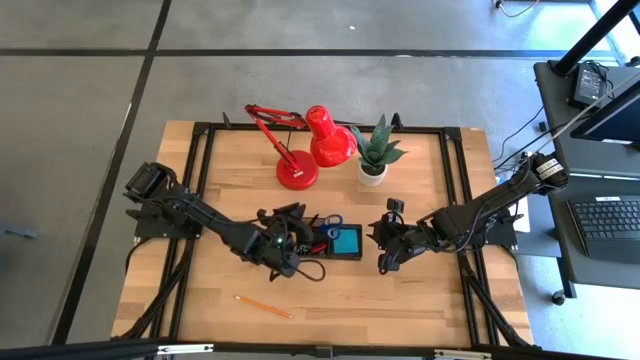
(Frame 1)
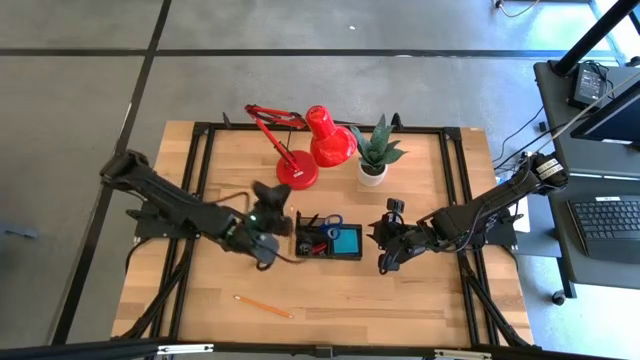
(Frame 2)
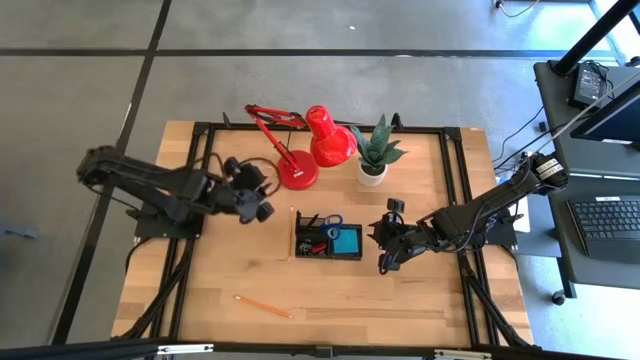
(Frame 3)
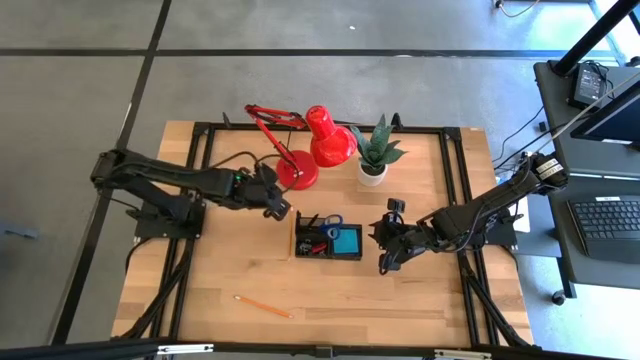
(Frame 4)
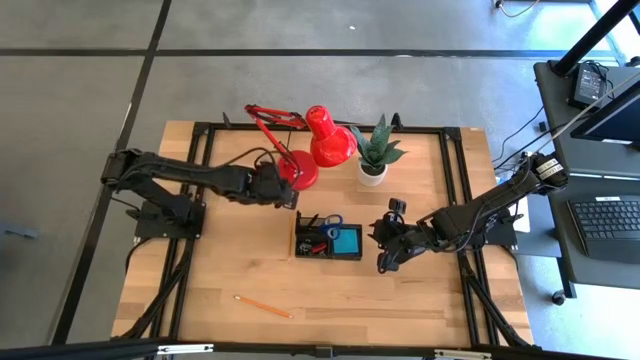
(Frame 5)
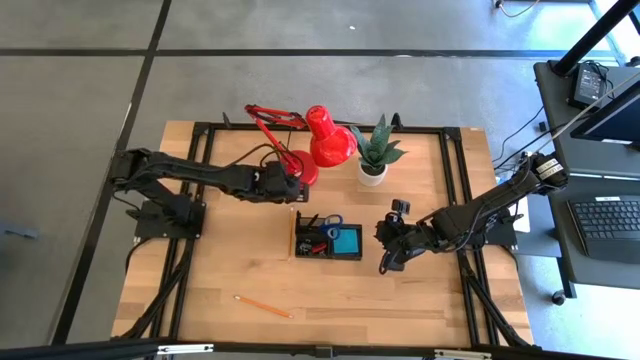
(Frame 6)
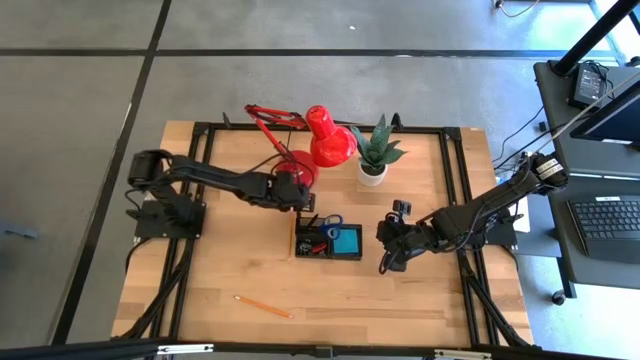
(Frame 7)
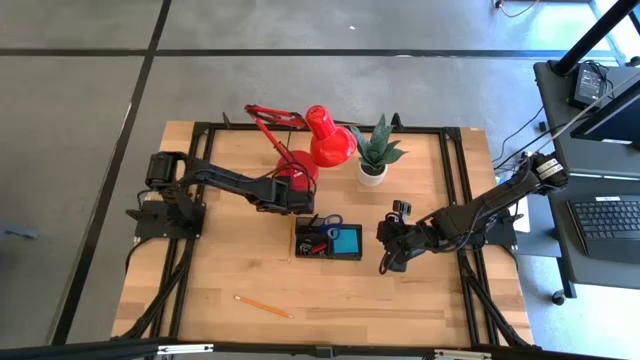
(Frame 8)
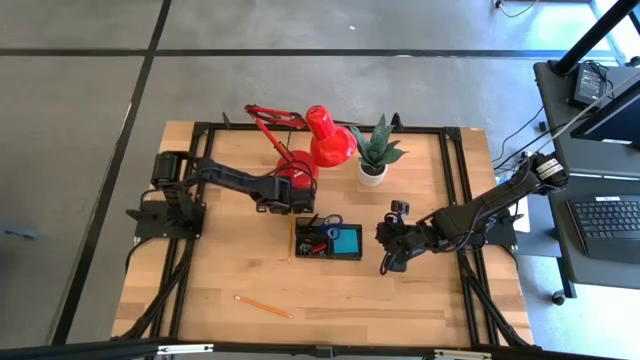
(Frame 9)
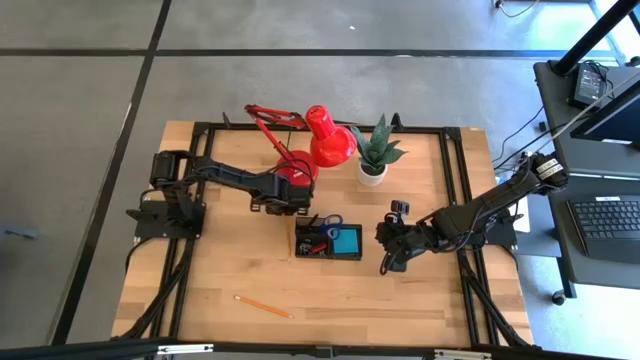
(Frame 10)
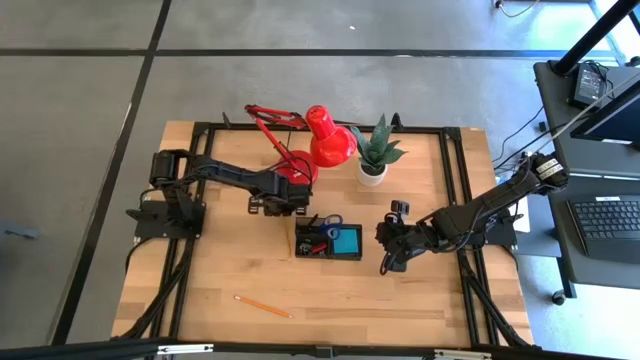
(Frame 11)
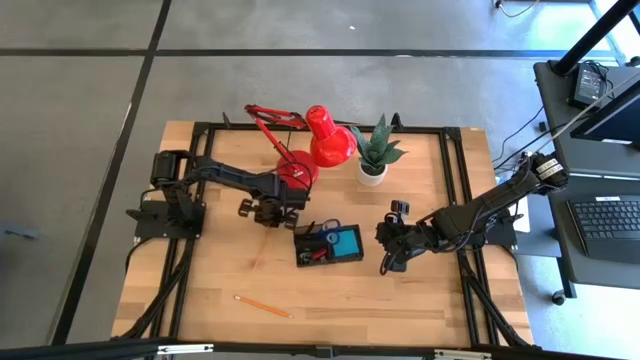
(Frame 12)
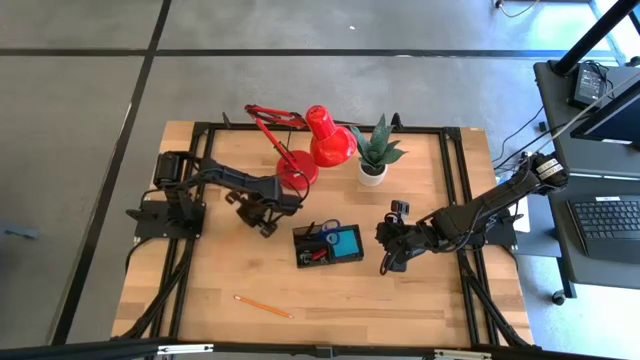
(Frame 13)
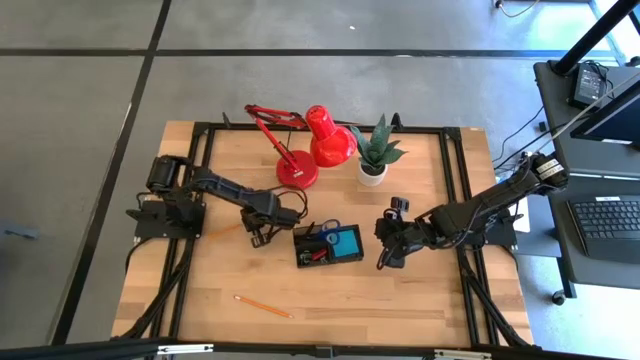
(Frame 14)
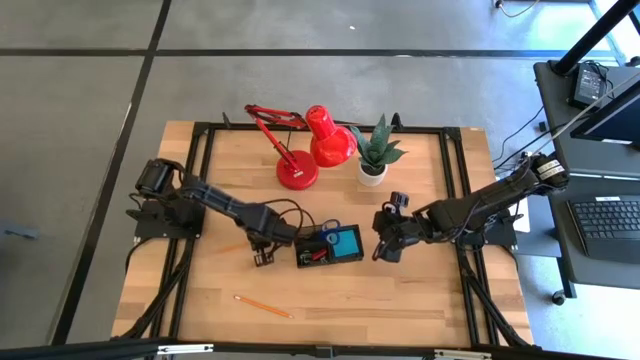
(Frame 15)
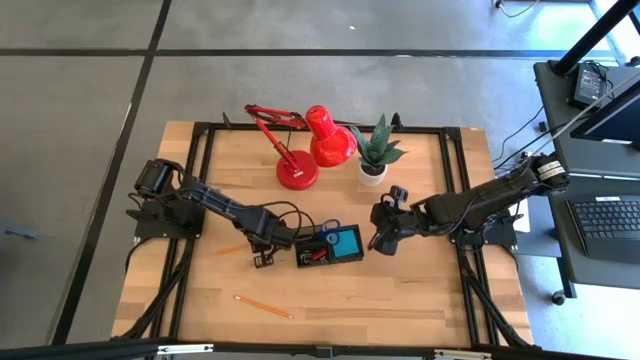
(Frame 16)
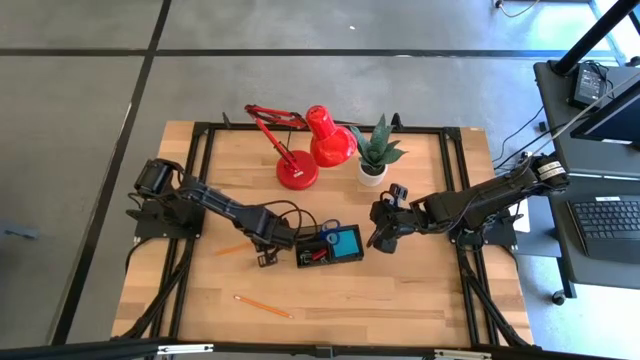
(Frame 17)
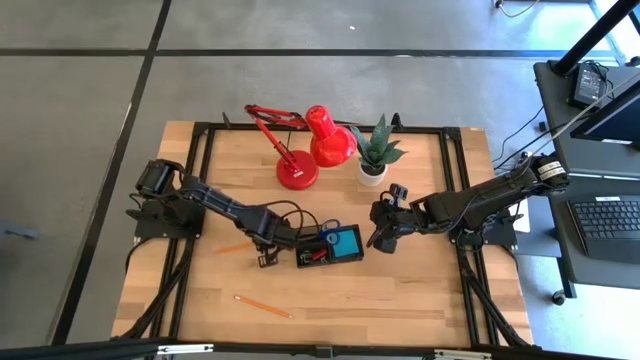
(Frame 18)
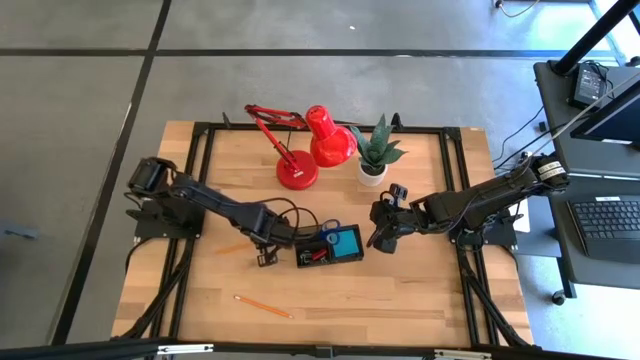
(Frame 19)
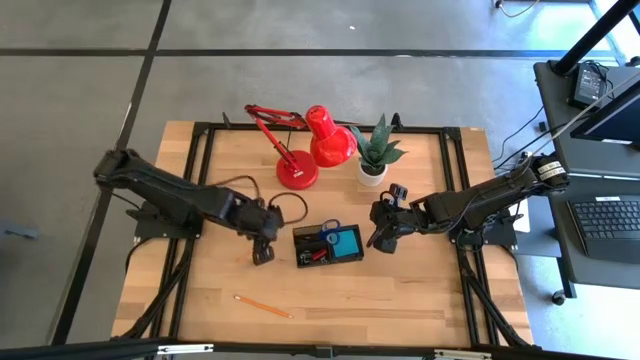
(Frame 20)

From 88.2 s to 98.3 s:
Task: Pick and place office supplies into organizer
Put the top yellow pencil into the black desk organizer

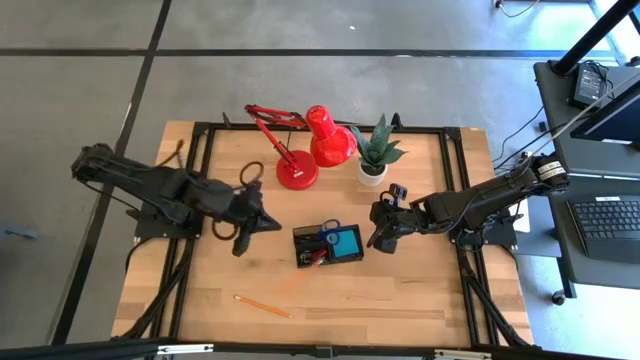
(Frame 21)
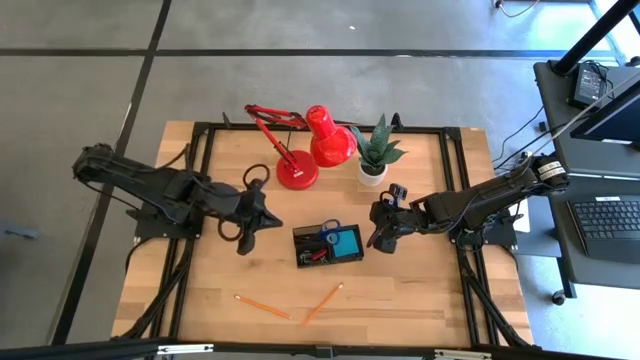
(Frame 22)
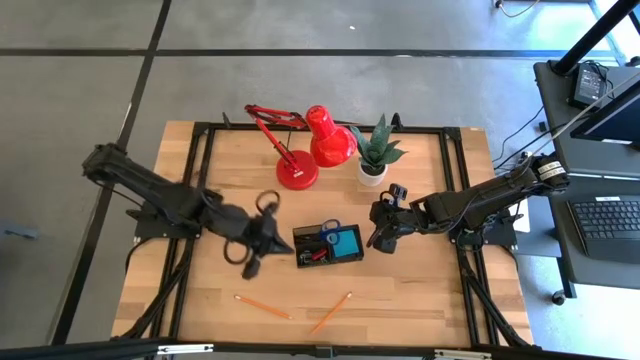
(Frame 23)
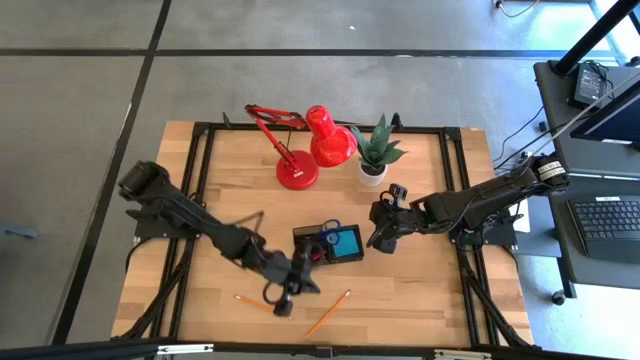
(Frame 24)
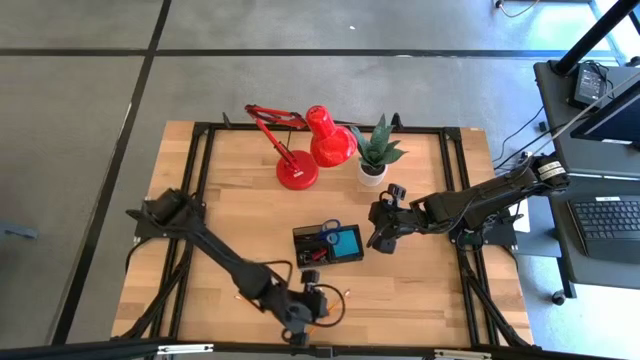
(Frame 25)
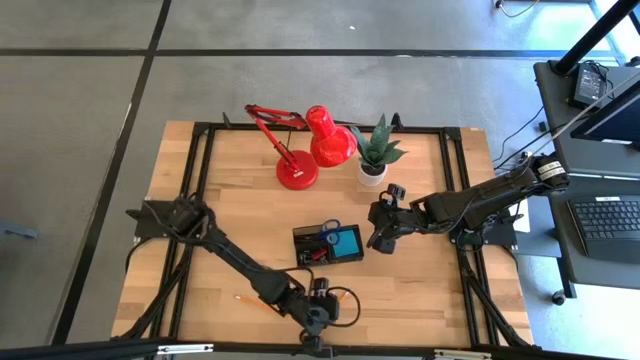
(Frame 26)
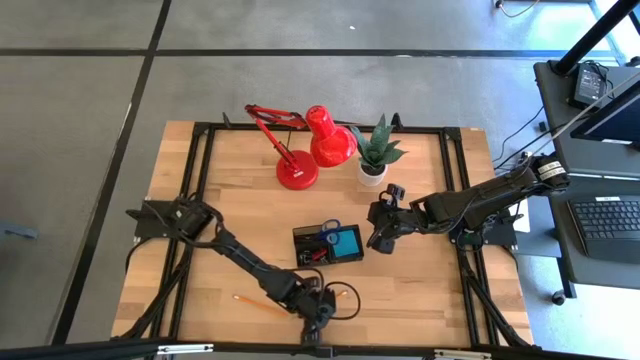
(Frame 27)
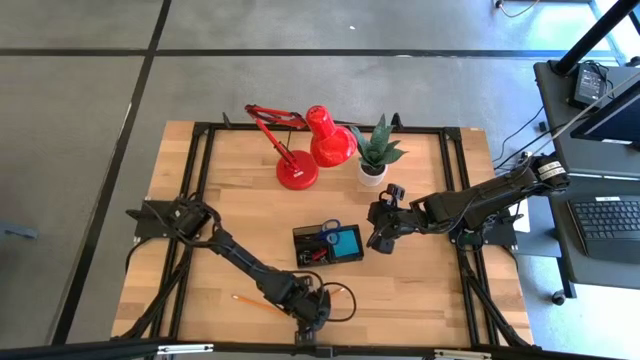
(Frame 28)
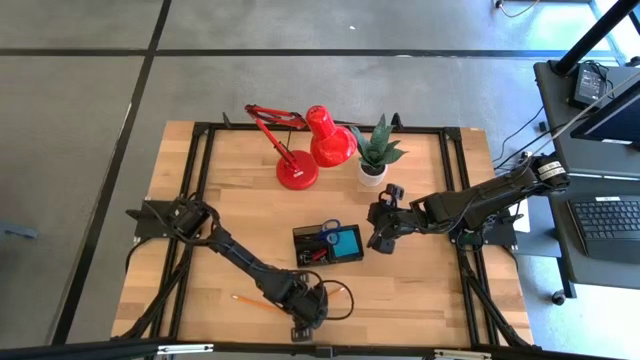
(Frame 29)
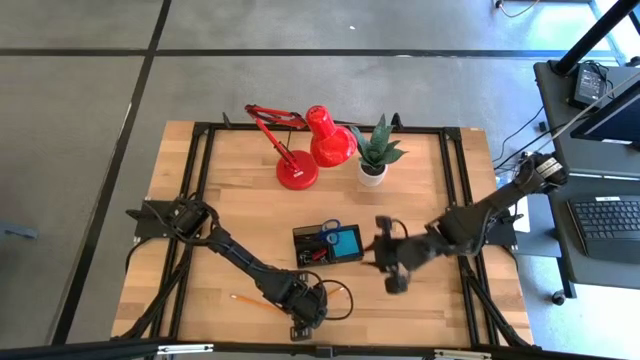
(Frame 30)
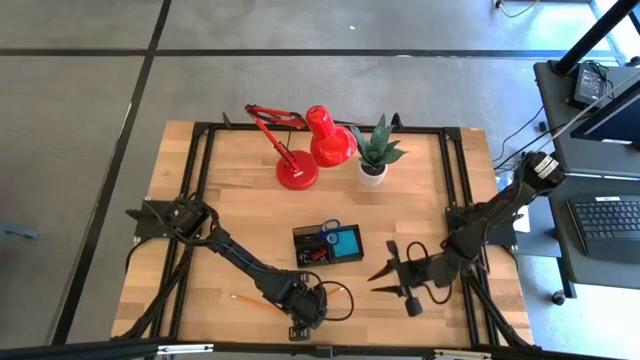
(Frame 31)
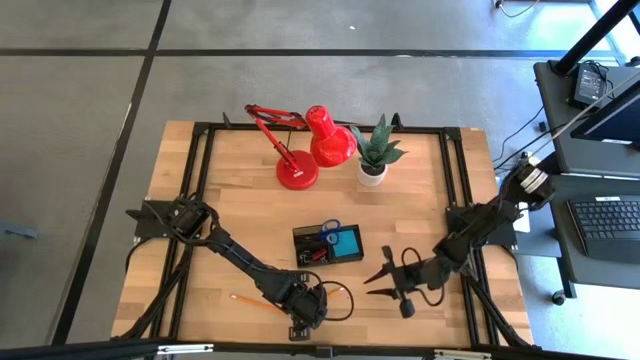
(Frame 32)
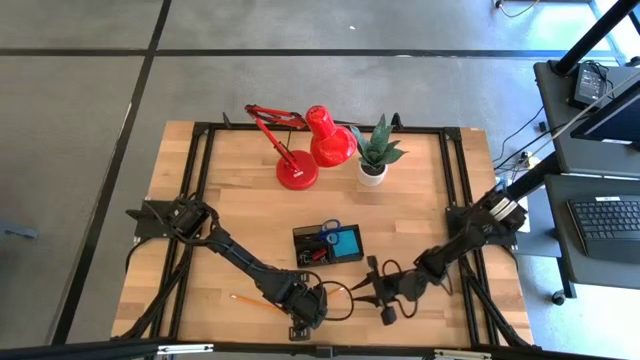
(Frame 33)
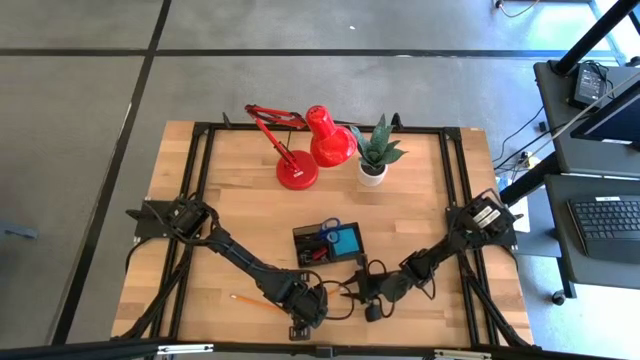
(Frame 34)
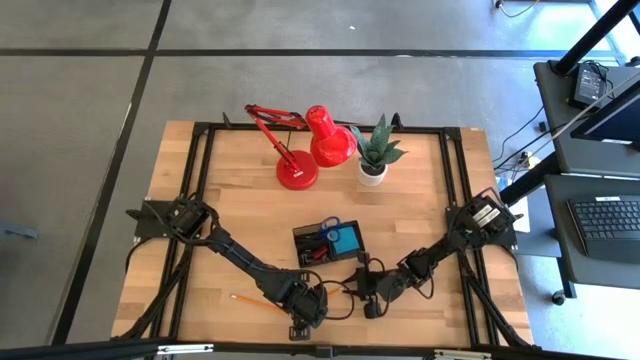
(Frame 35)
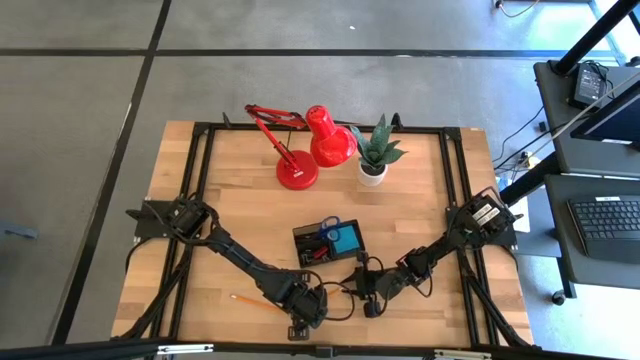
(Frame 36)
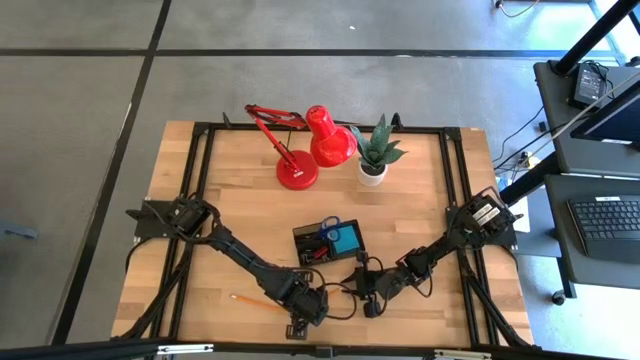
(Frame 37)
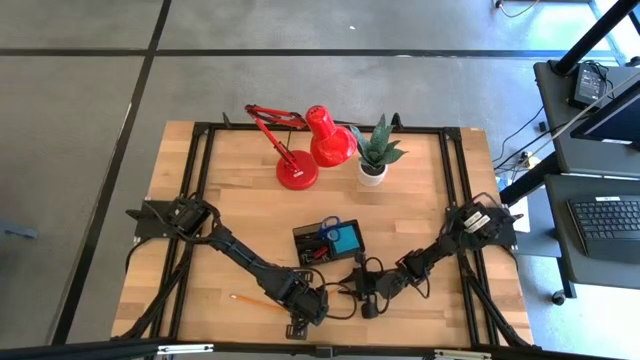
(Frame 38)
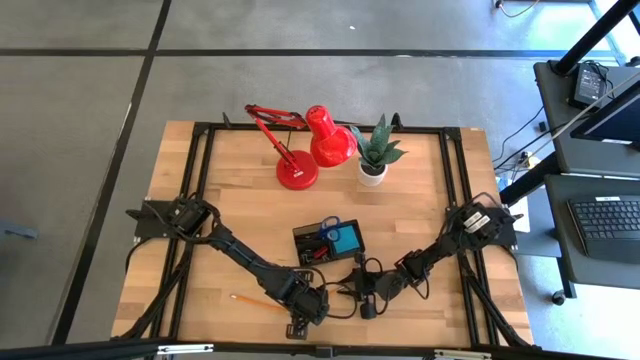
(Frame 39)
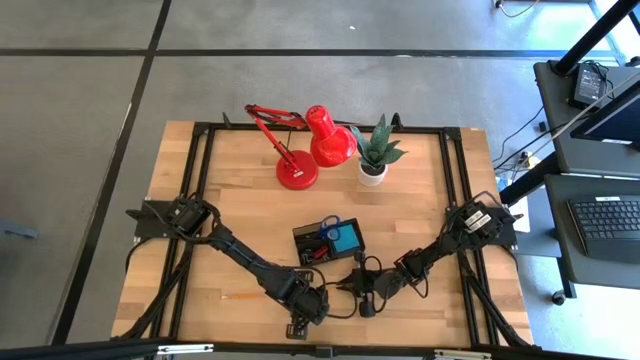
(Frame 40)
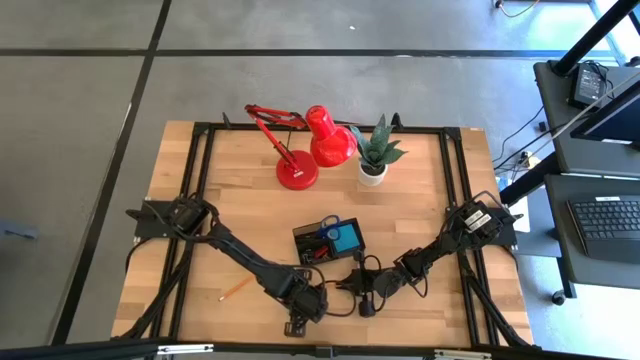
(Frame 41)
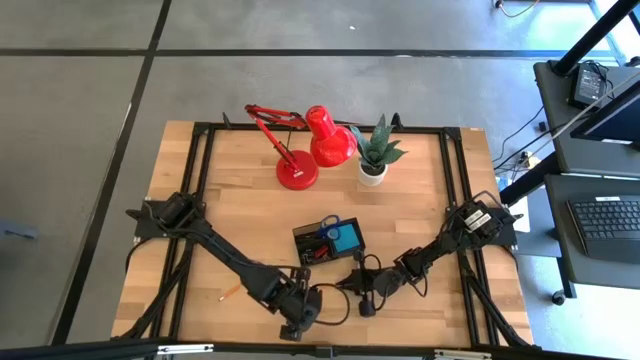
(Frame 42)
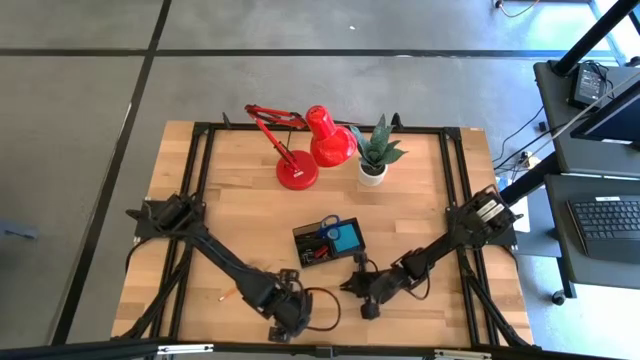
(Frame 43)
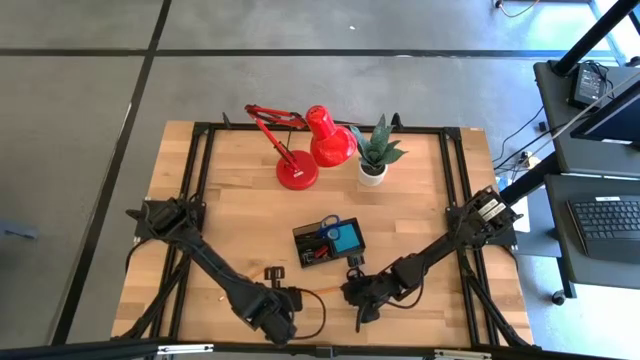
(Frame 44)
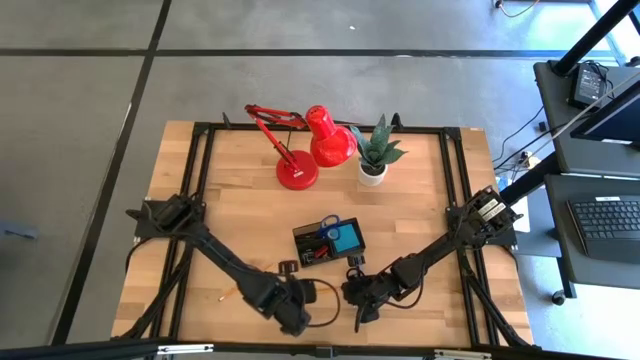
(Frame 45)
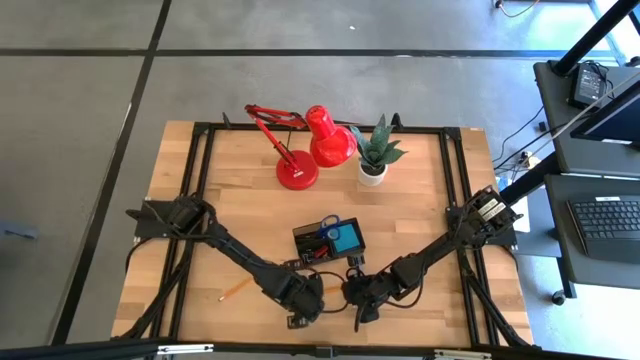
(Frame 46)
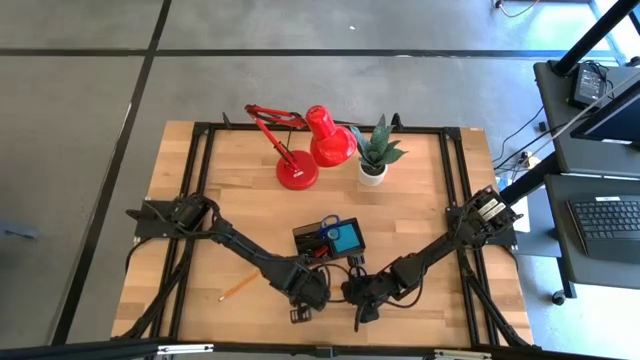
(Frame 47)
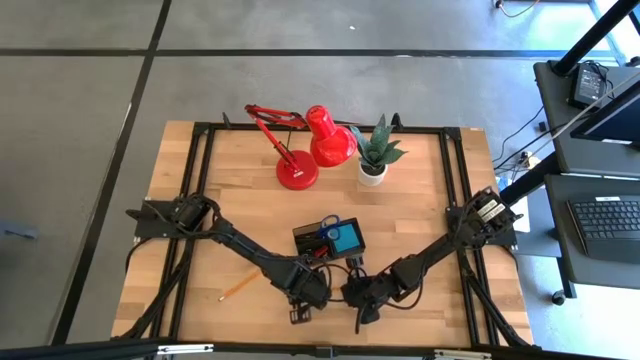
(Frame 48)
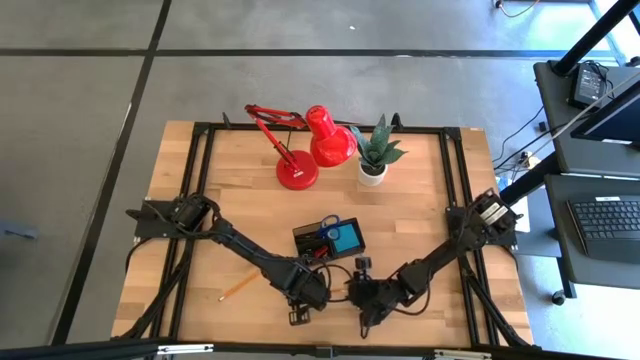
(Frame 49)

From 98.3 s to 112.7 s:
Put the top yellow pencil into the black desk organizer
